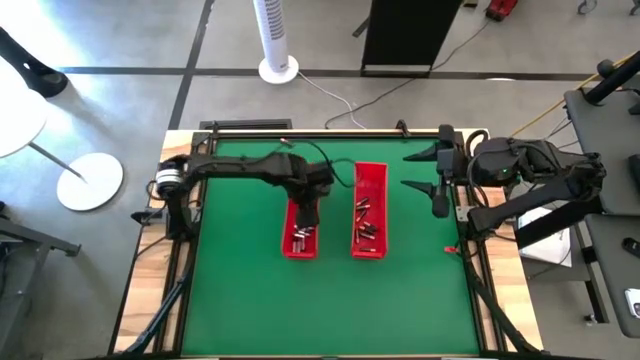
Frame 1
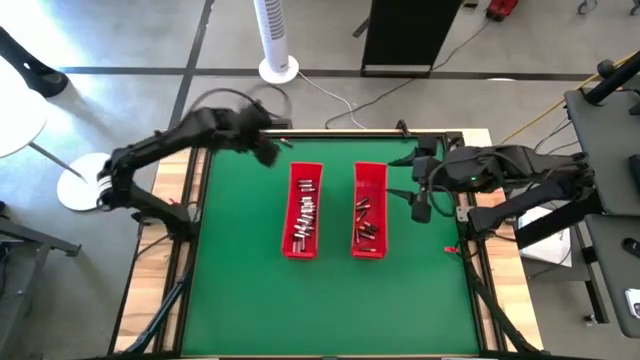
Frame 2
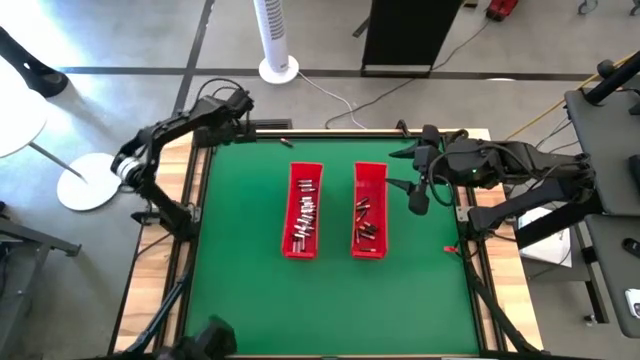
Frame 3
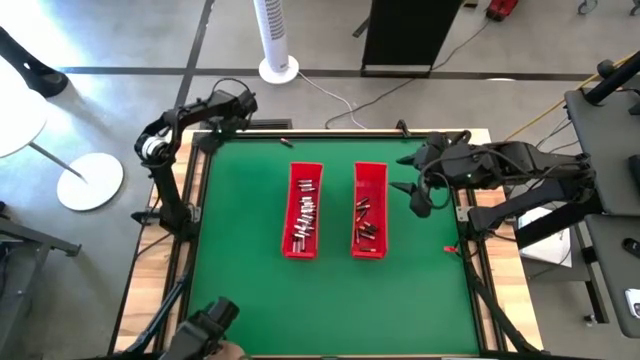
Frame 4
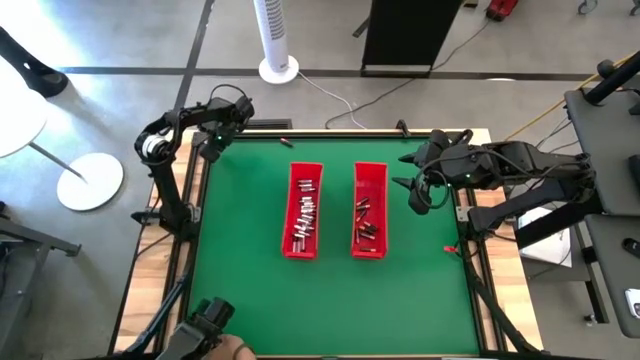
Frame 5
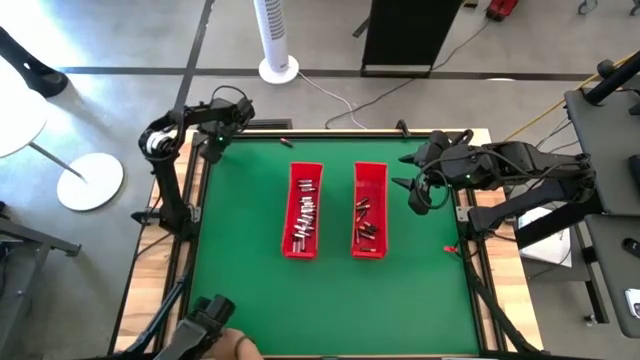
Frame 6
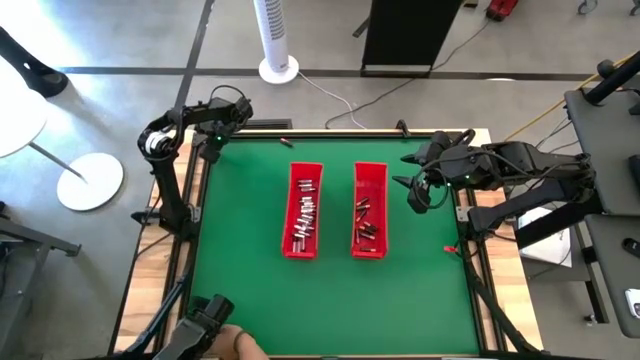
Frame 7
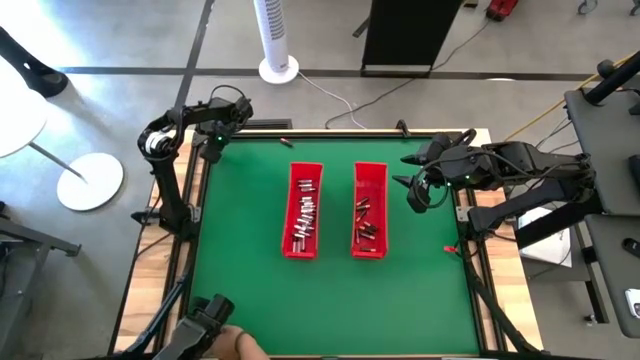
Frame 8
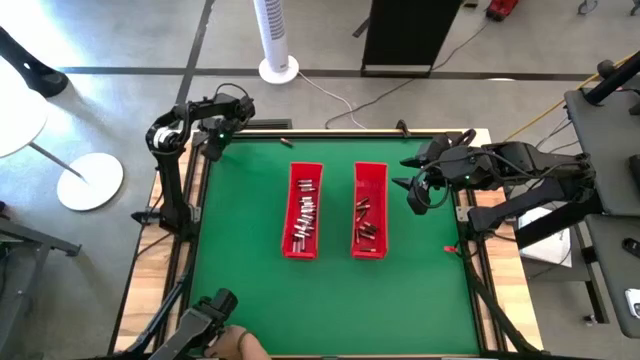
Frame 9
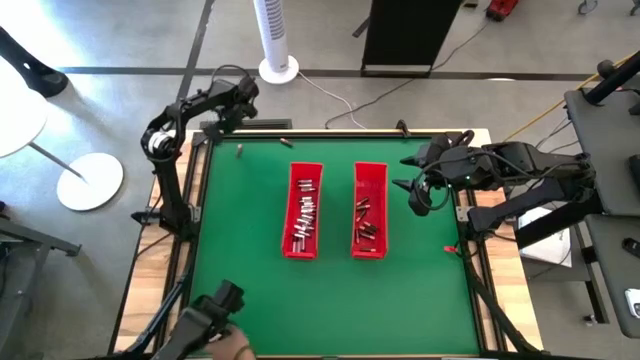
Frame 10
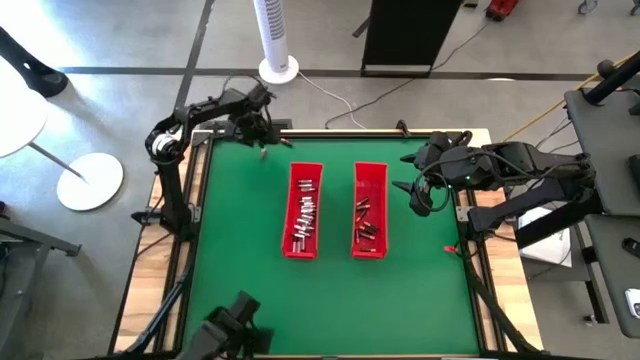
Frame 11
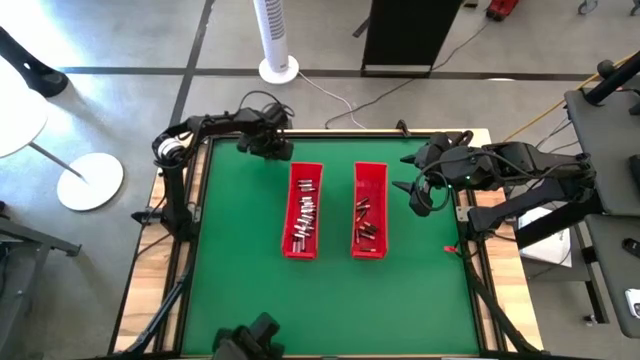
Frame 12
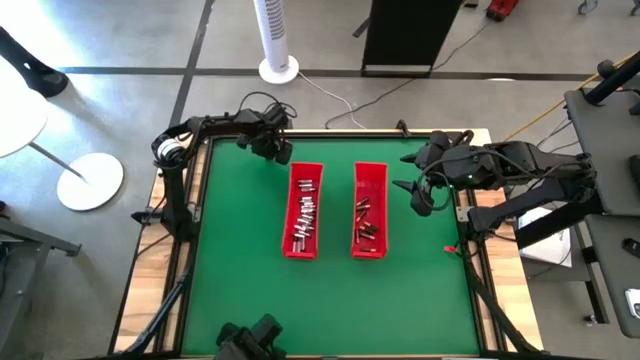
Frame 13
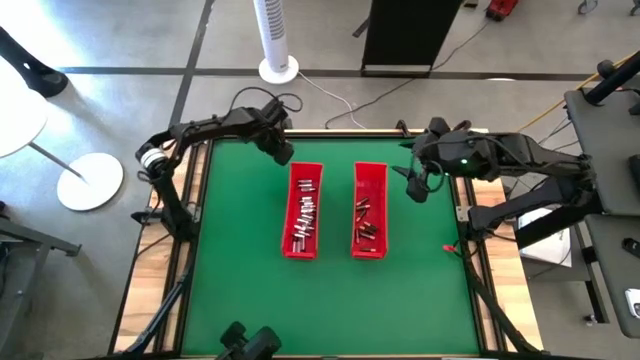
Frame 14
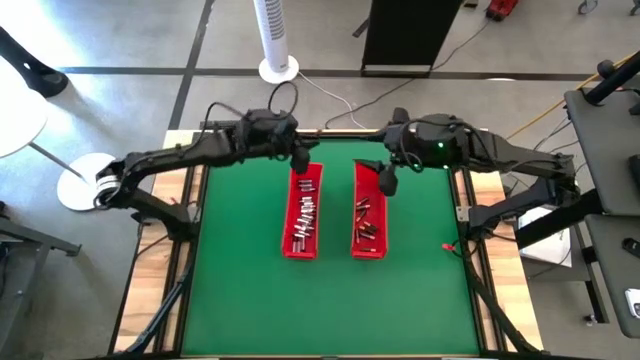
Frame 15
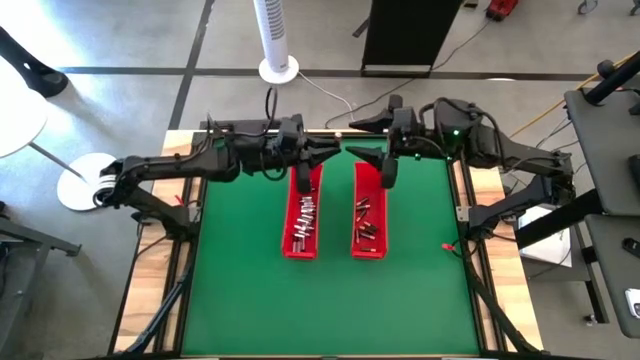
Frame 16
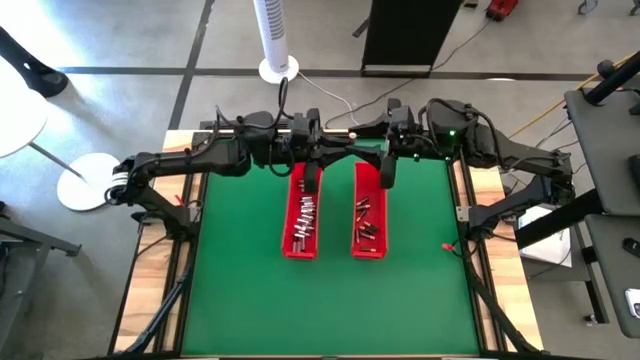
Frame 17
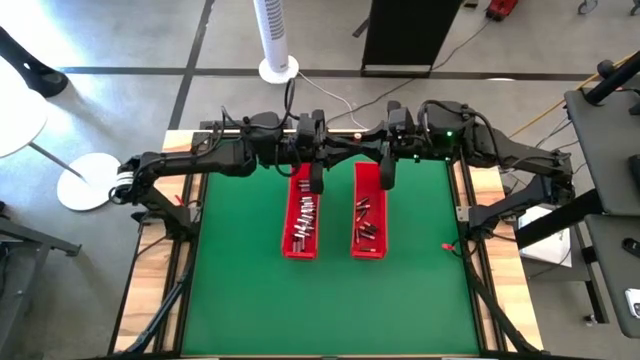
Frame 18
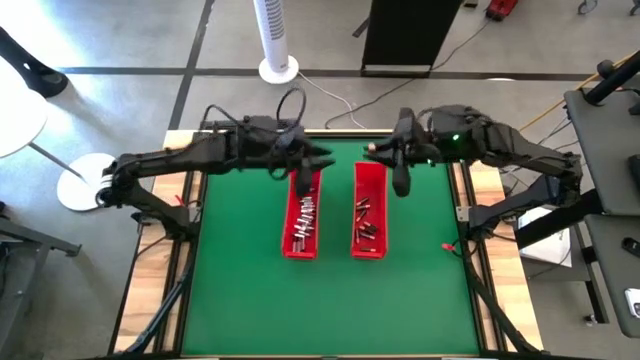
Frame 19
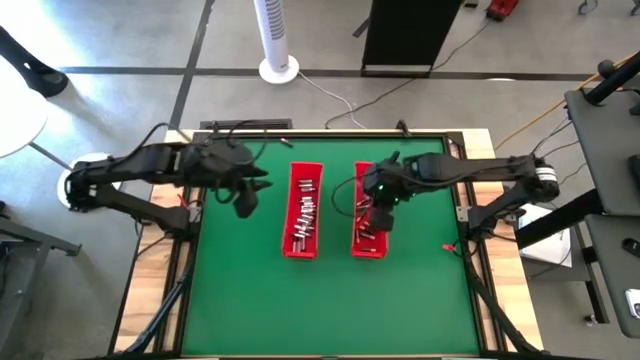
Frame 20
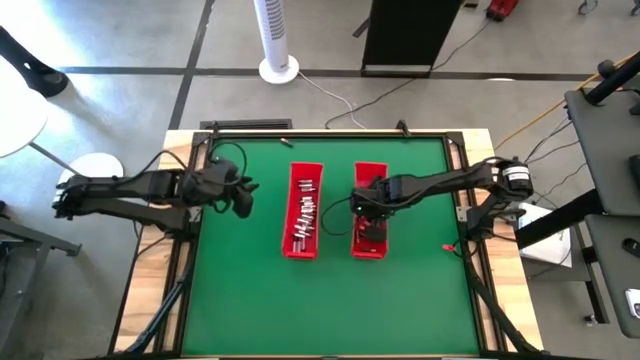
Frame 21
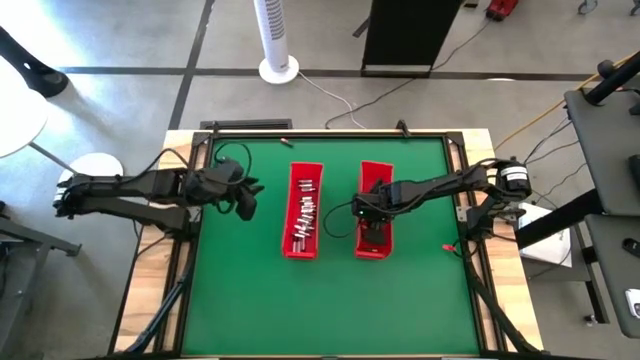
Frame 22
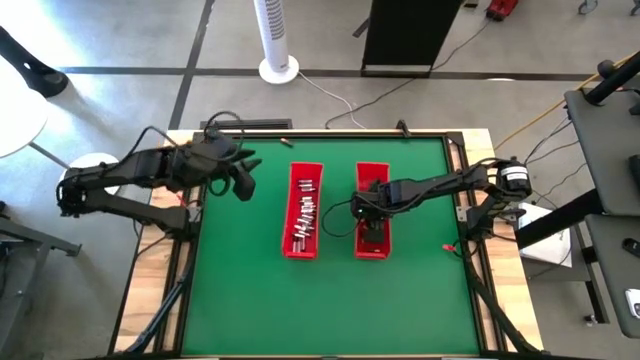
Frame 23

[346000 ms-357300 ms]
Task: Sort batteries
Put the black battery into the right red bin

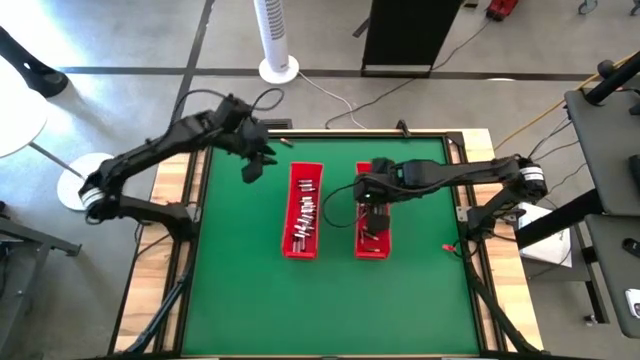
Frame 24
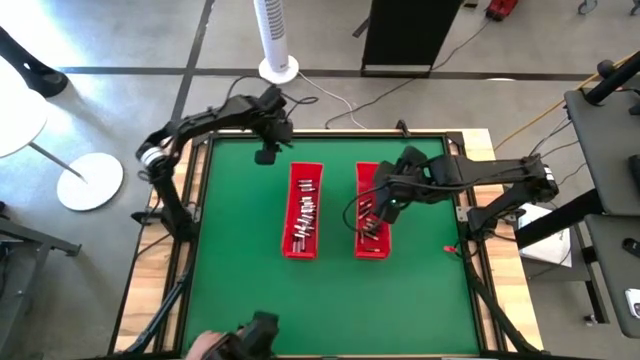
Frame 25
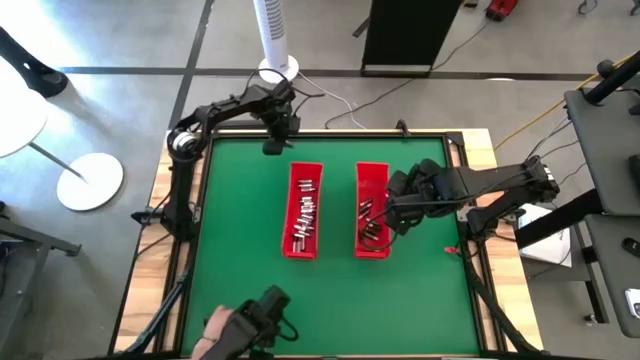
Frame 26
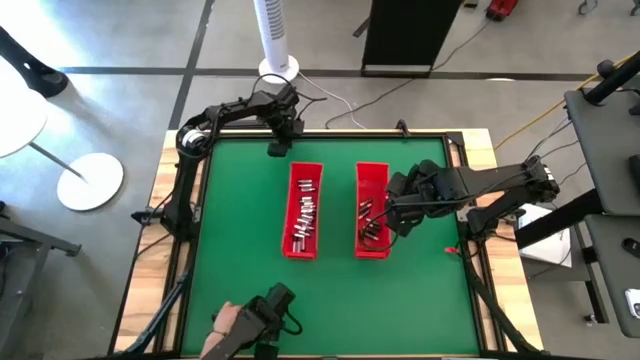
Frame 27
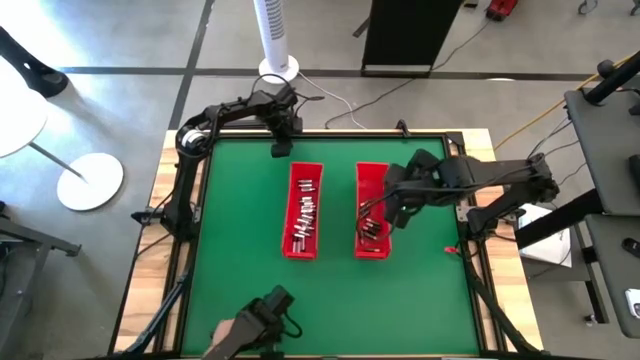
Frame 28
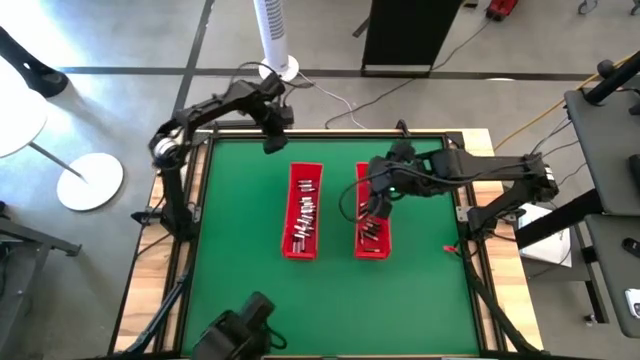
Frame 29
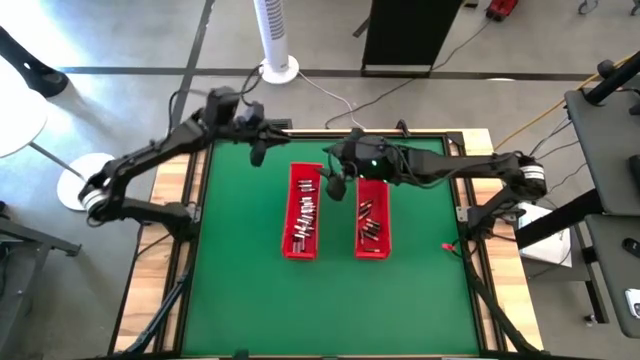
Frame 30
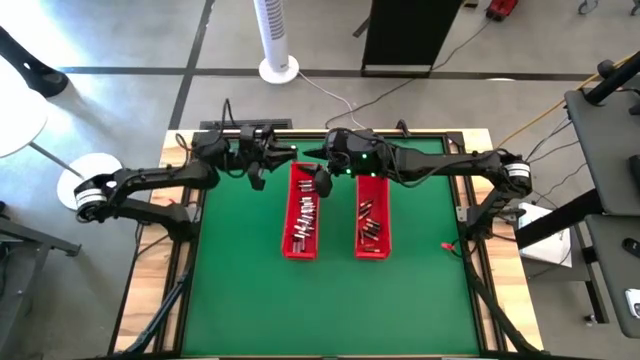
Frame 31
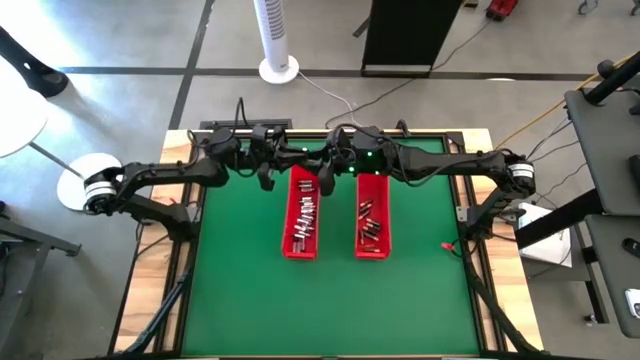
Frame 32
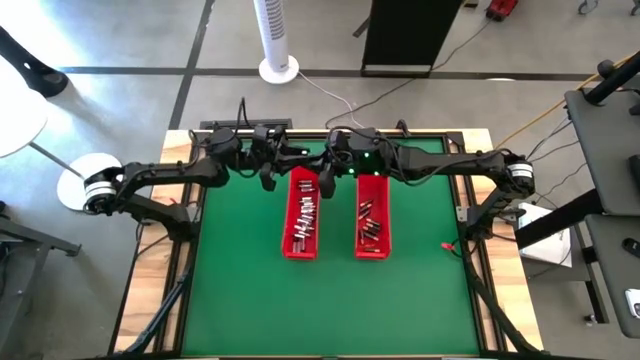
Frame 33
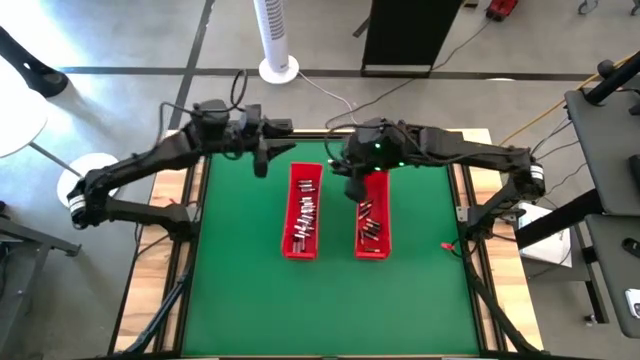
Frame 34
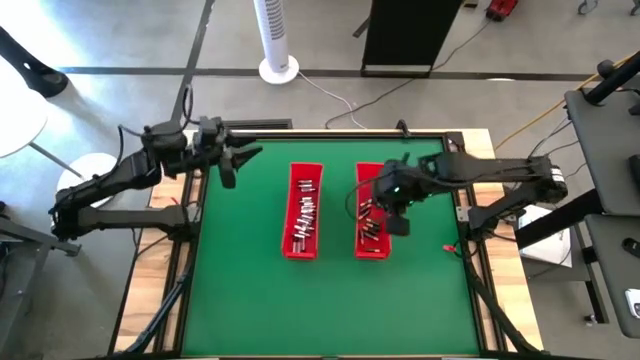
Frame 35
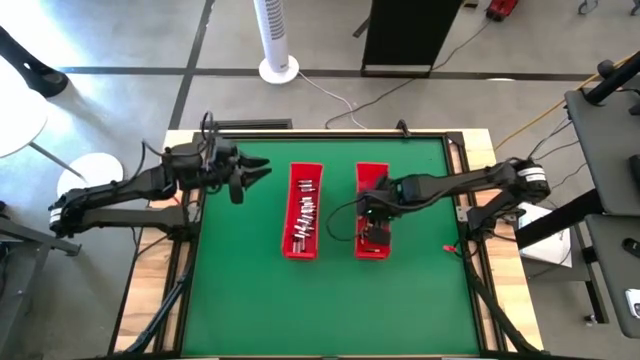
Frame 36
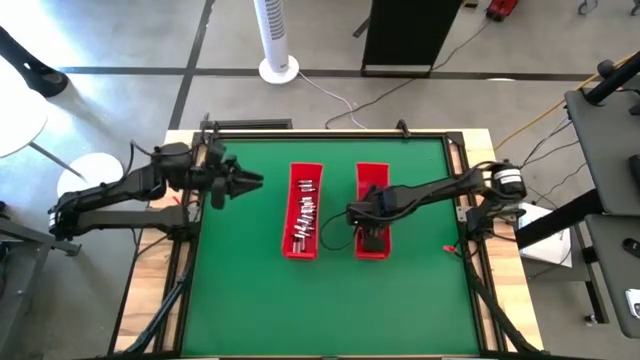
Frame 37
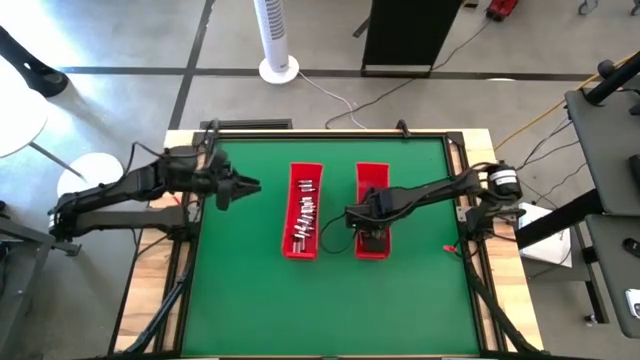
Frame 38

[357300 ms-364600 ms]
Put the black battery into the right red bin
